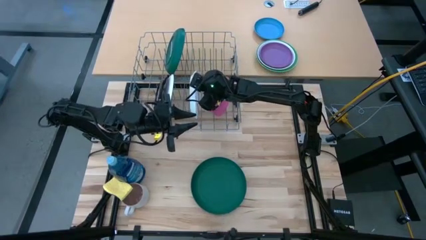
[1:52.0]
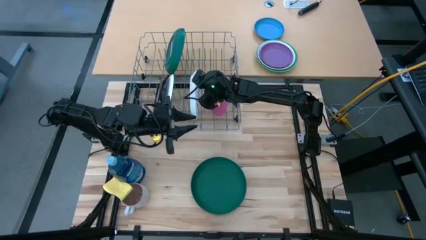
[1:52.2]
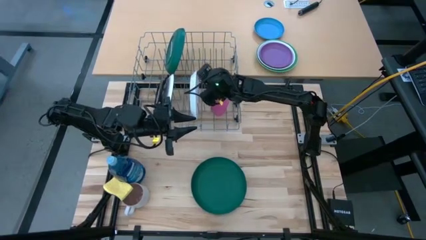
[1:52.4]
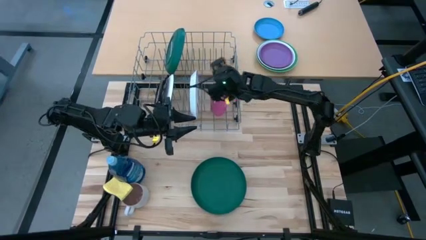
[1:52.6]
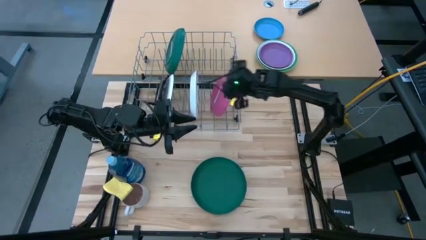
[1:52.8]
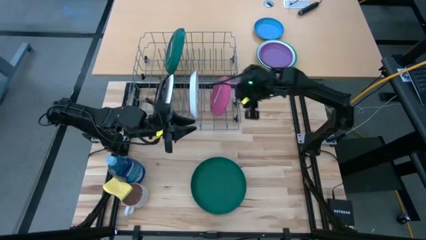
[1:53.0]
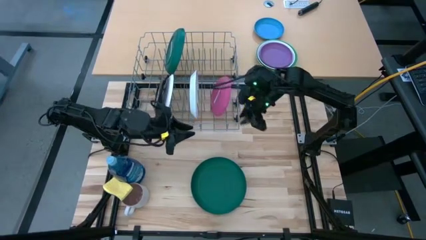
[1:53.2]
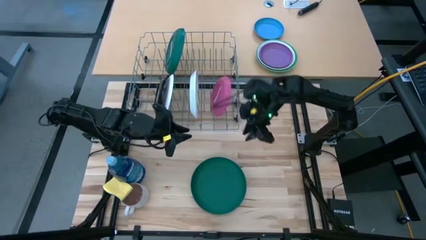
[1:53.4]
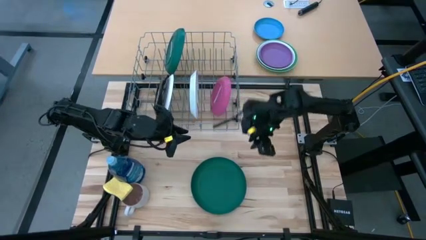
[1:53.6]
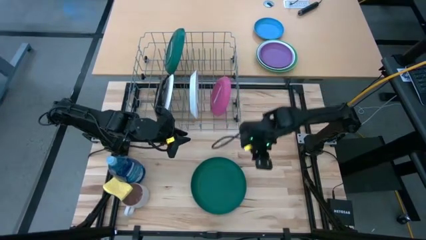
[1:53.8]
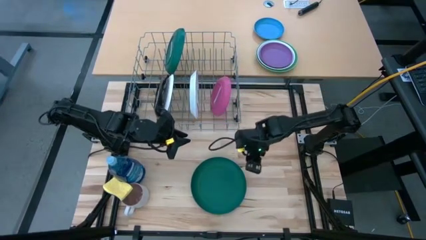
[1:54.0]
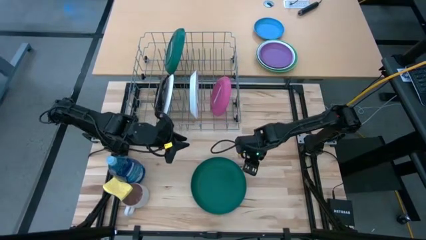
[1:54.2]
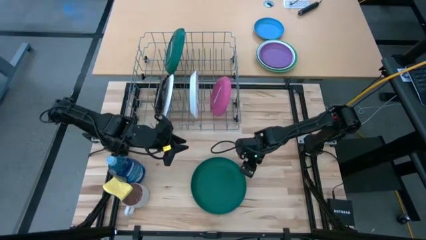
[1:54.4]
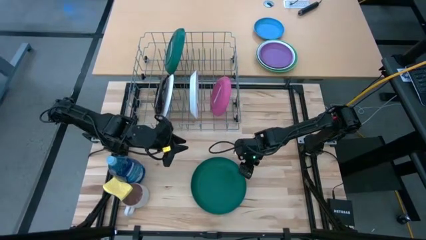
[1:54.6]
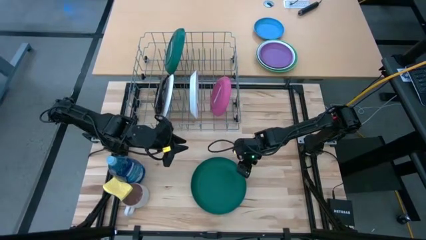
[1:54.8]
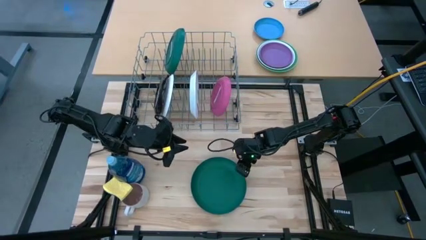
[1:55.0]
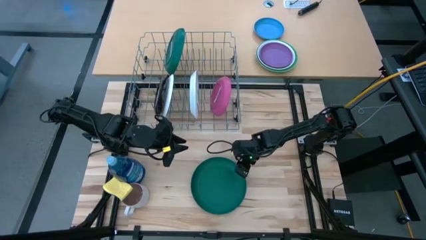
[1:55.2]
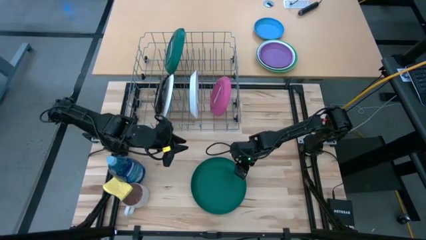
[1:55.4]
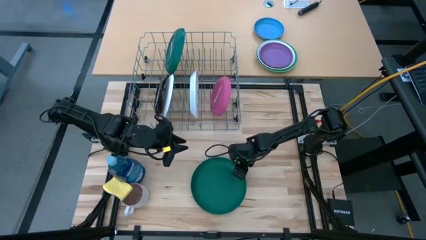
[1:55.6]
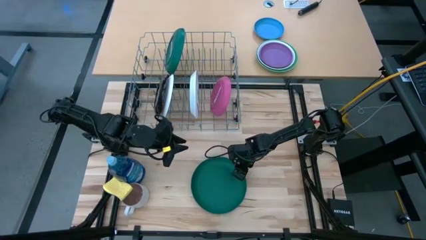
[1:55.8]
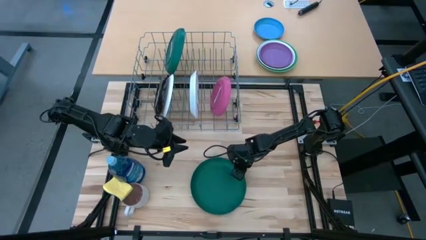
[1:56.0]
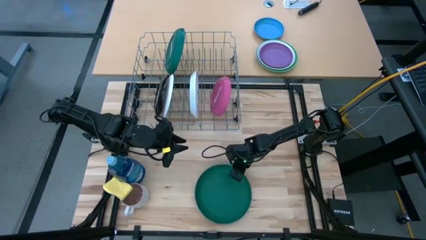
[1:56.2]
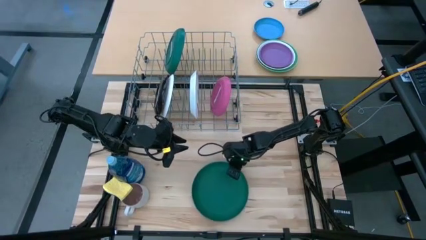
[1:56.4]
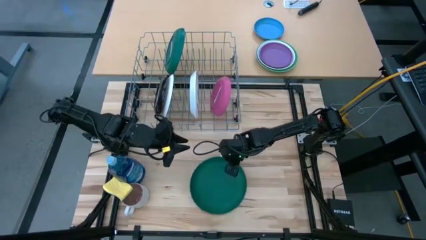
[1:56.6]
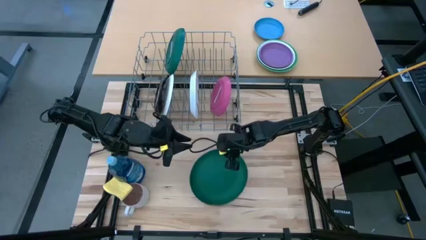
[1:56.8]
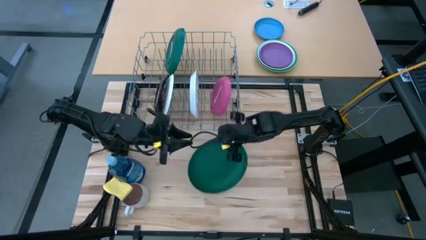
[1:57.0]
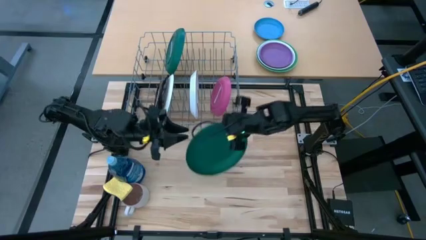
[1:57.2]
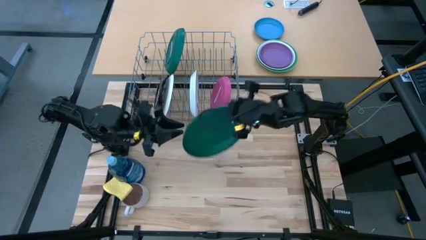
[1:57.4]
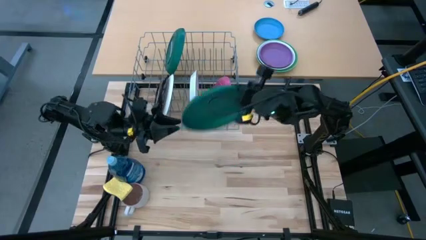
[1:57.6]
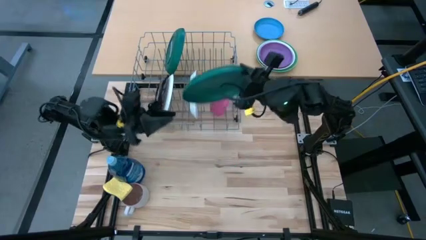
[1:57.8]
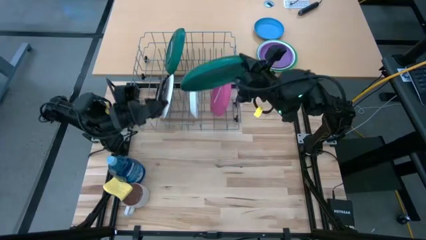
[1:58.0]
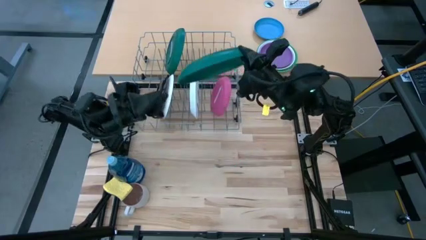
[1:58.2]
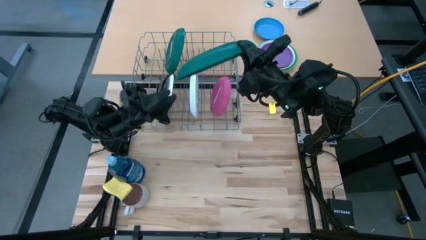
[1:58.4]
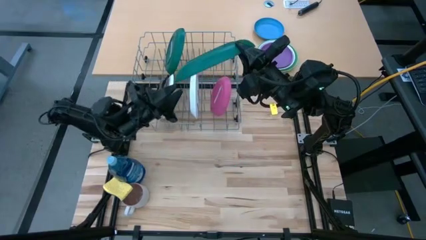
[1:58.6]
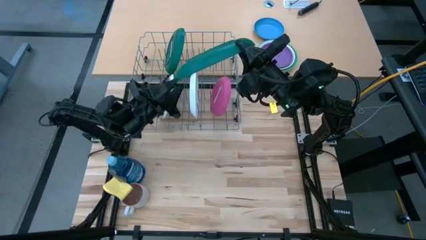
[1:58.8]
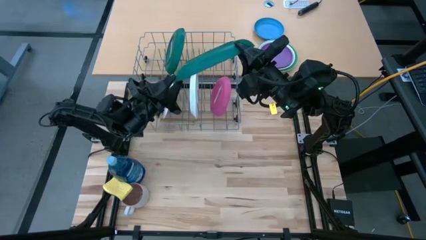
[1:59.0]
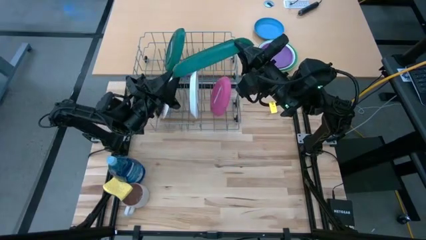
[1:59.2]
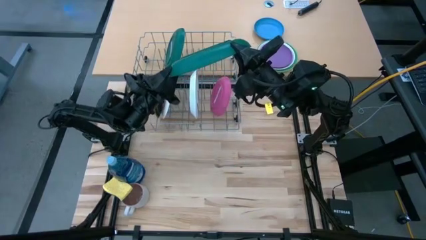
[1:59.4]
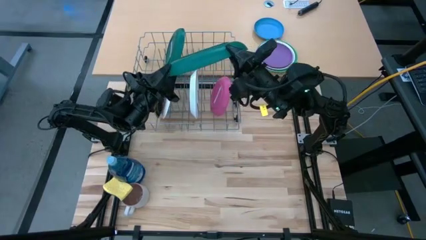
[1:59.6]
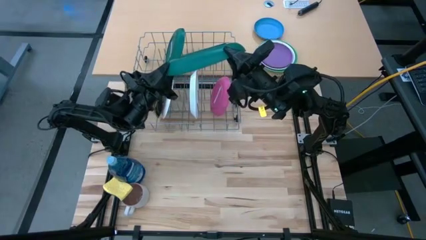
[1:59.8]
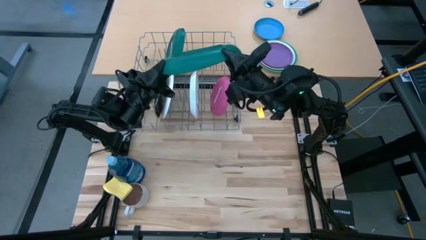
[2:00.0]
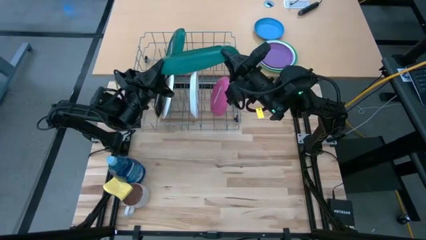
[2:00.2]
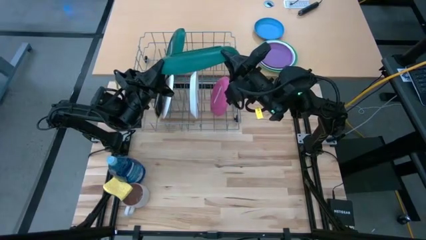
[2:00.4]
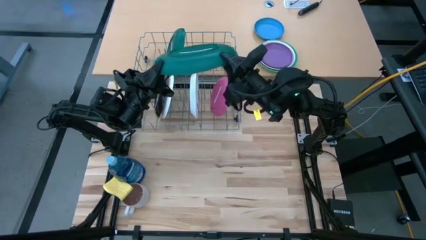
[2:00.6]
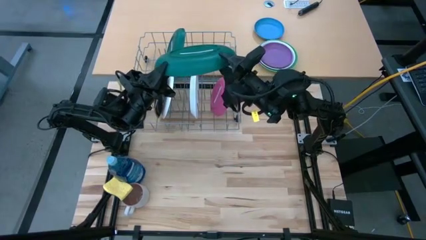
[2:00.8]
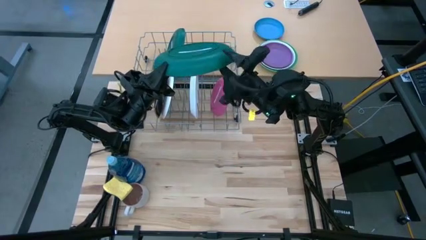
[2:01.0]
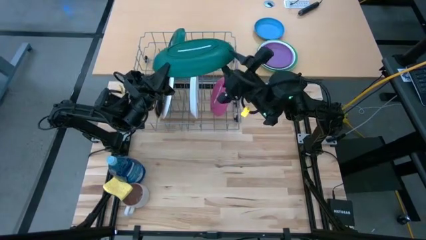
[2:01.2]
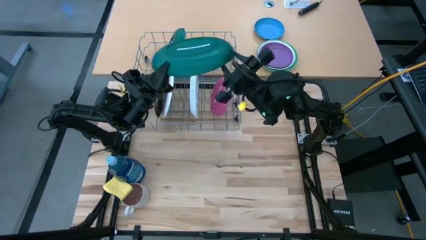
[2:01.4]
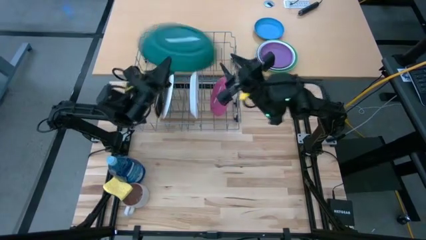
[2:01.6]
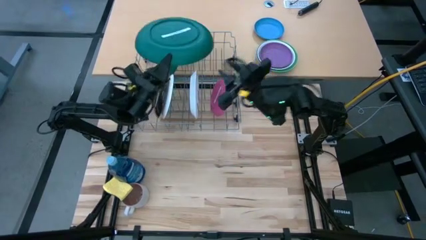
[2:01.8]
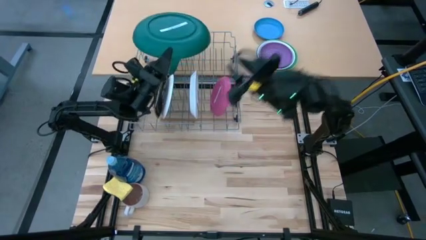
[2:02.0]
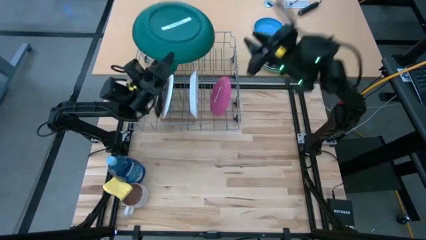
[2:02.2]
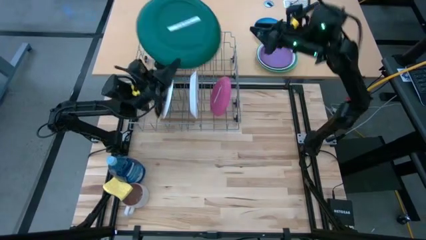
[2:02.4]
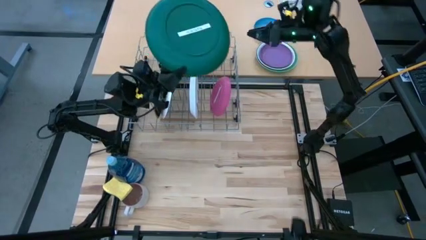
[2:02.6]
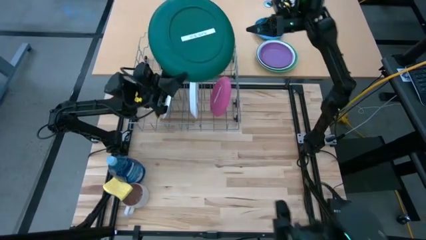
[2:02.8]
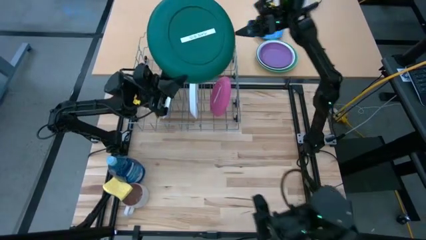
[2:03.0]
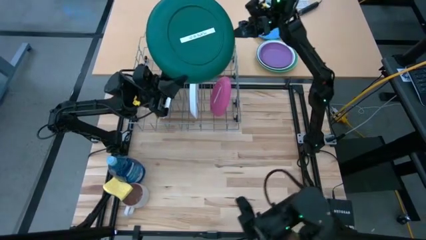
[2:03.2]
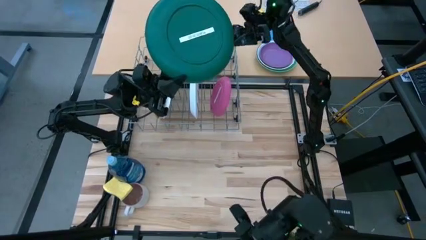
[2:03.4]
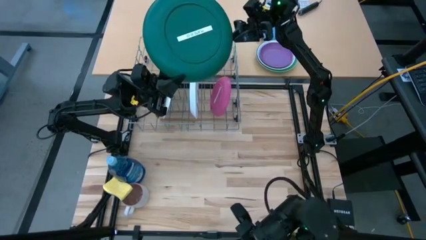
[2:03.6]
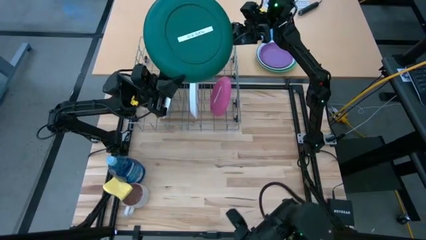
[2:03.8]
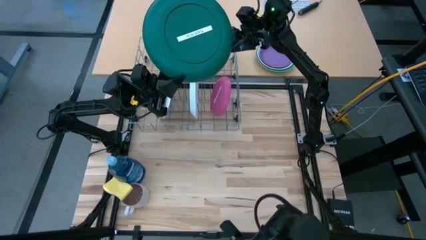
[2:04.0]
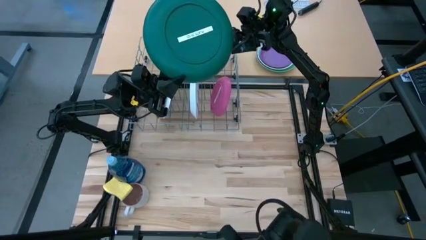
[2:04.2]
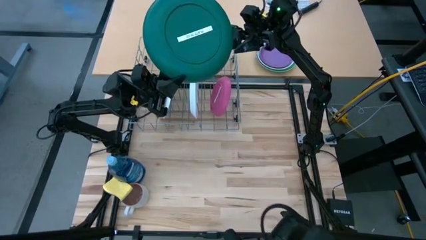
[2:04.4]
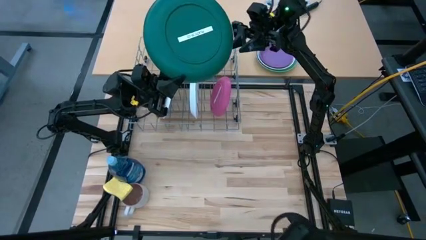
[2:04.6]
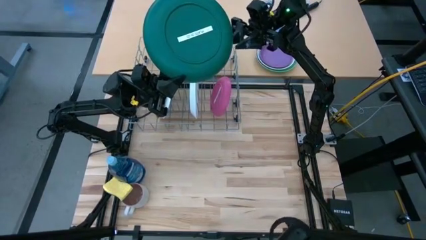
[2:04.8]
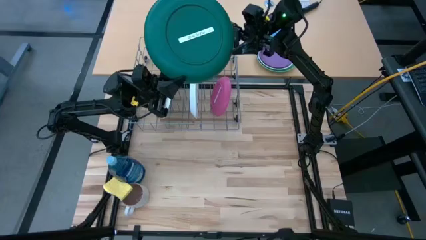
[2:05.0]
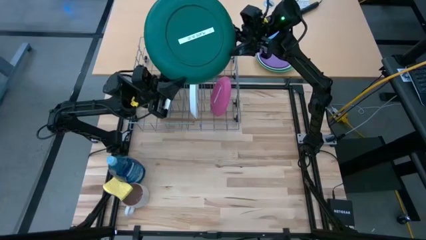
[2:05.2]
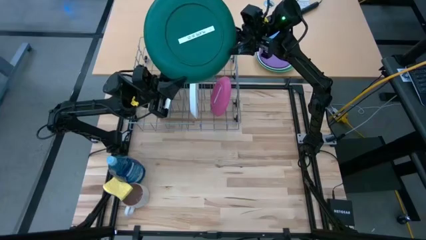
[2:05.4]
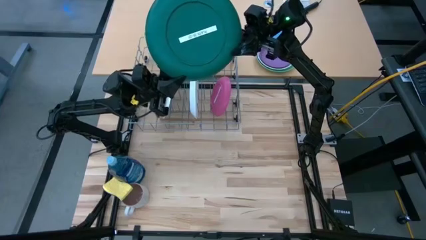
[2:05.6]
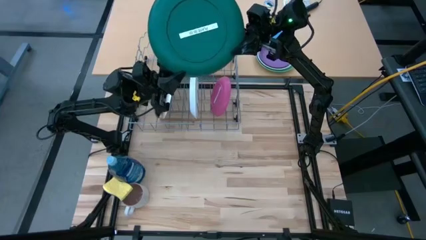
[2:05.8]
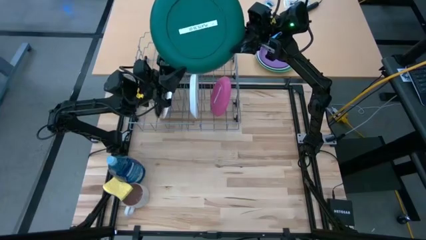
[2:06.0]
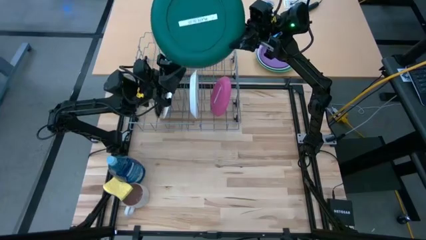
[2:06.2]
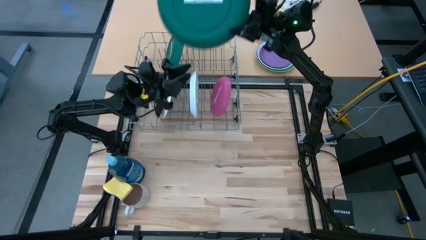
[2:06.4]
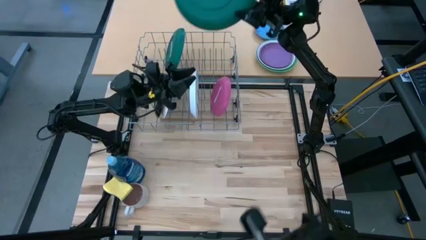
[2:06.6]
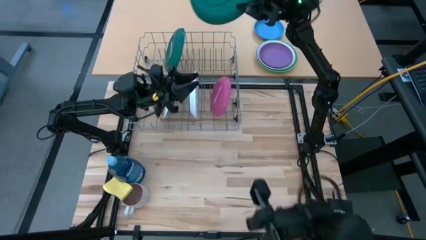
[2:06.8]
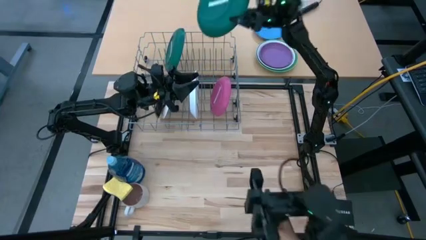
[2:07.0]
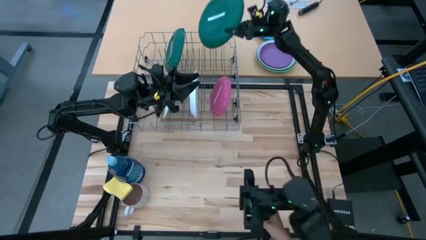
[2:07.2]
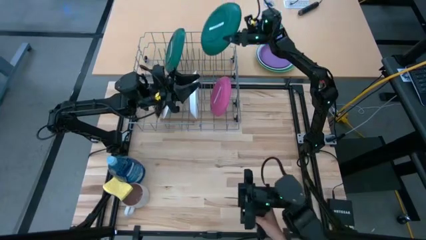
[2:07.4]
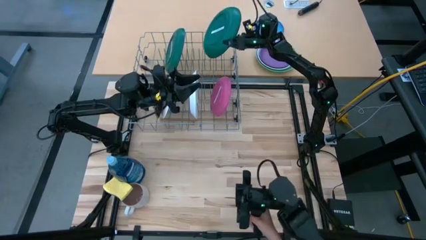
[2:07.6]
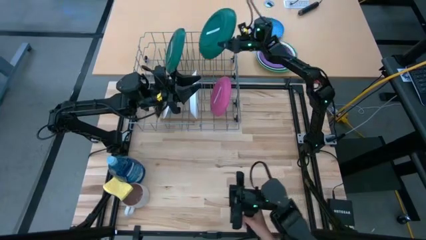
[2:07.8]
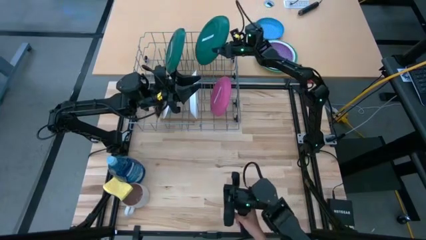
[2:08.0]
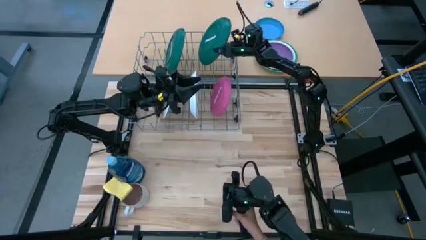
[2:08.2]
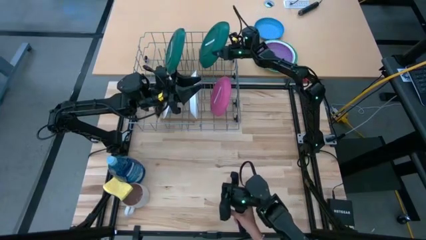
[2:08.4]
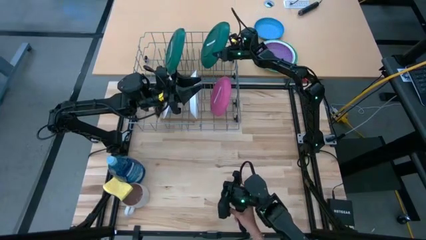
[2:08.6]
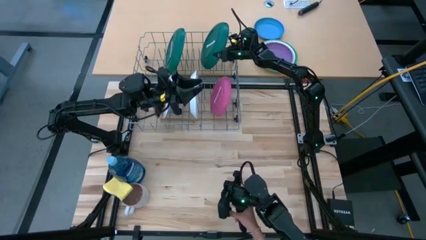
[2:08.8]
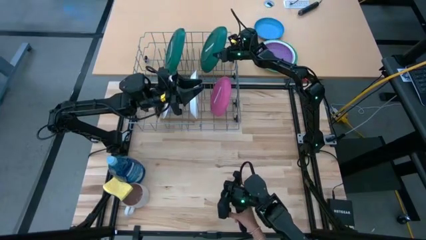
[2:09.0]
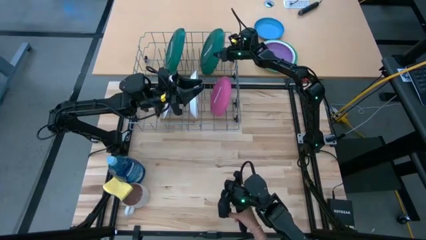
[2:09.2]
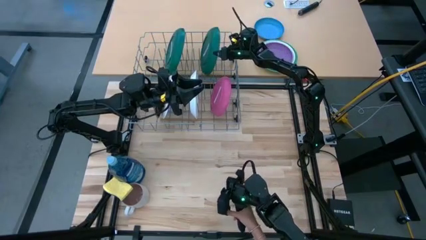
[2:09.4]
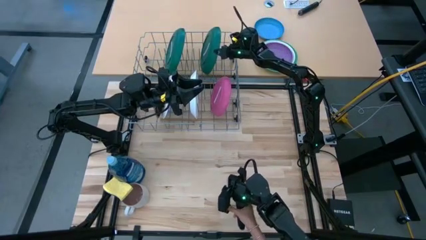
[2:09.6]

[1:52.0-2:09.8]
Task: Sort dishes
Put the green plate on the dish rack
